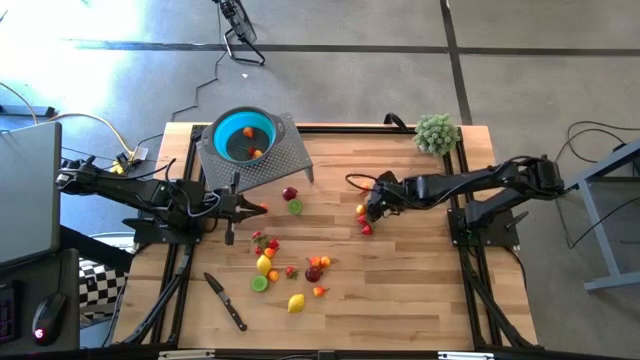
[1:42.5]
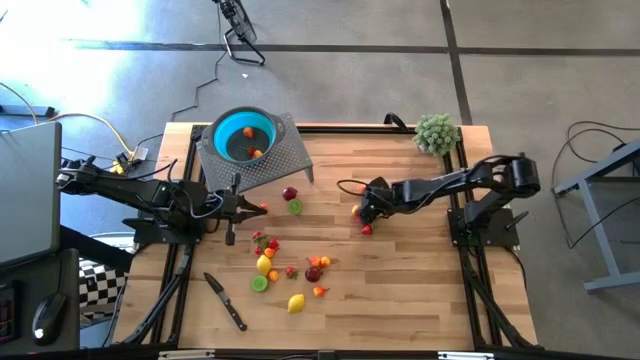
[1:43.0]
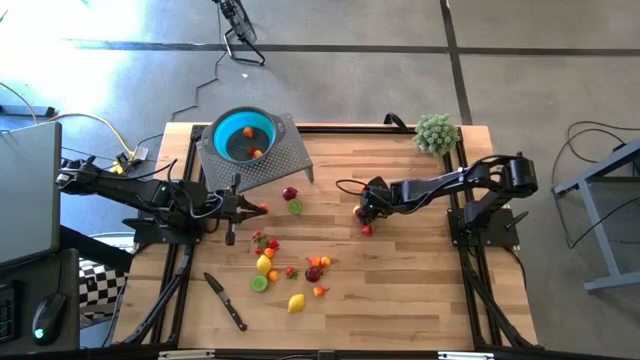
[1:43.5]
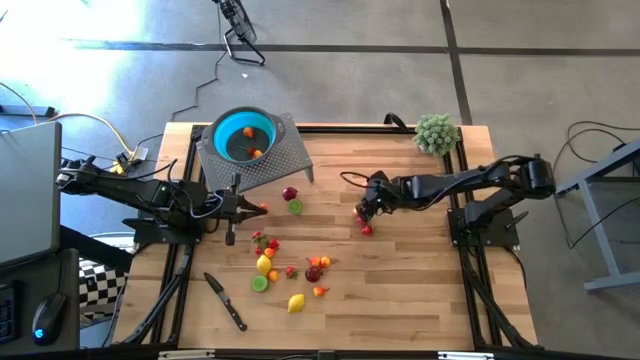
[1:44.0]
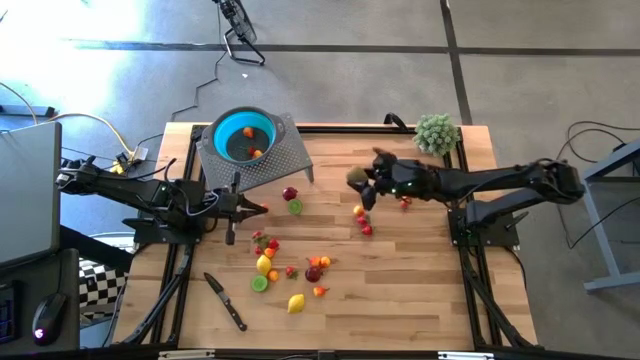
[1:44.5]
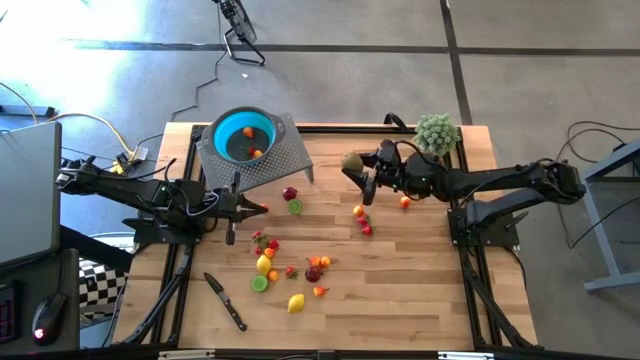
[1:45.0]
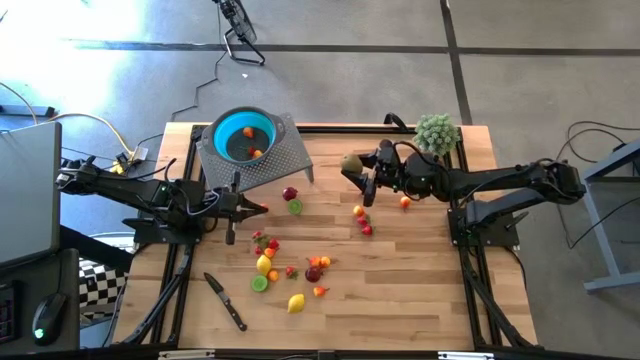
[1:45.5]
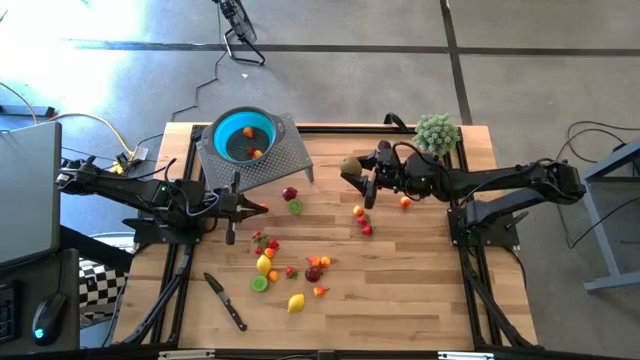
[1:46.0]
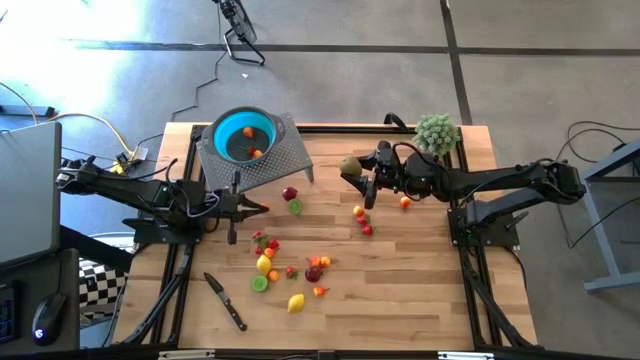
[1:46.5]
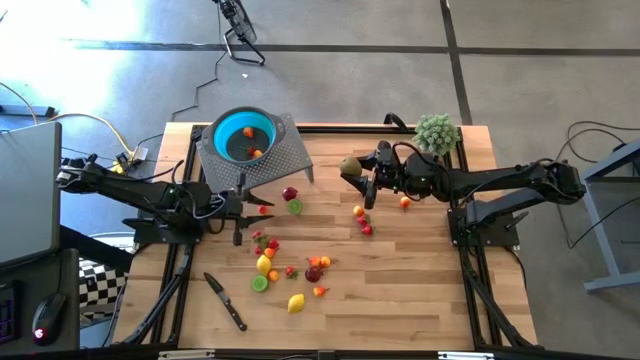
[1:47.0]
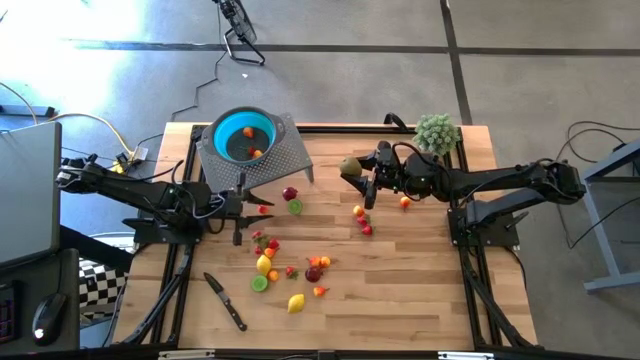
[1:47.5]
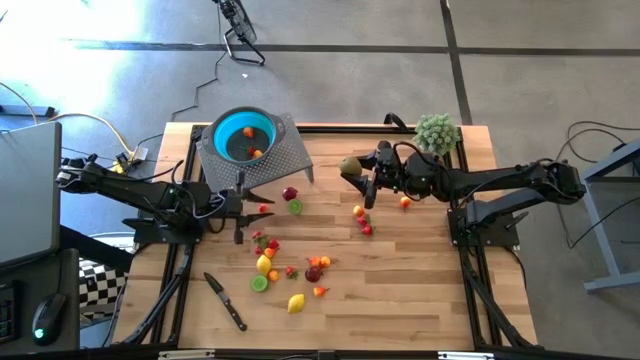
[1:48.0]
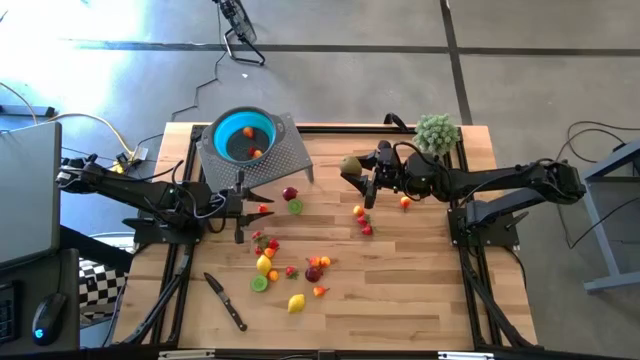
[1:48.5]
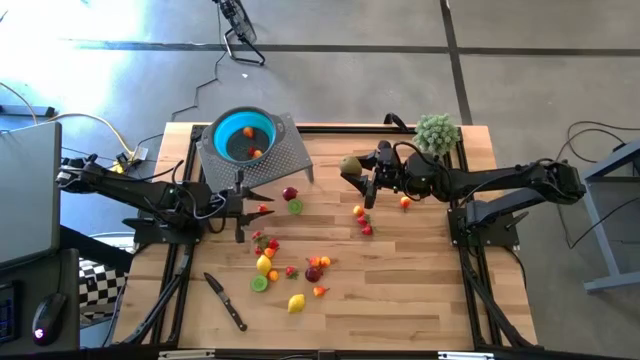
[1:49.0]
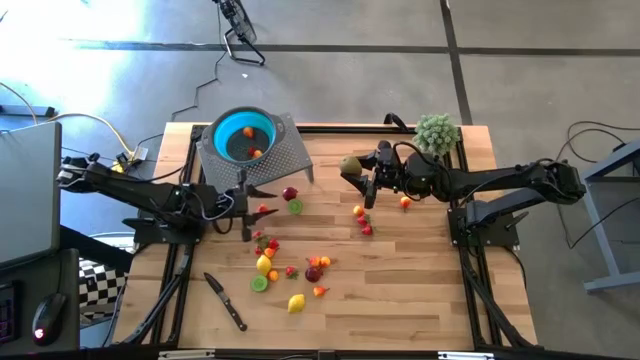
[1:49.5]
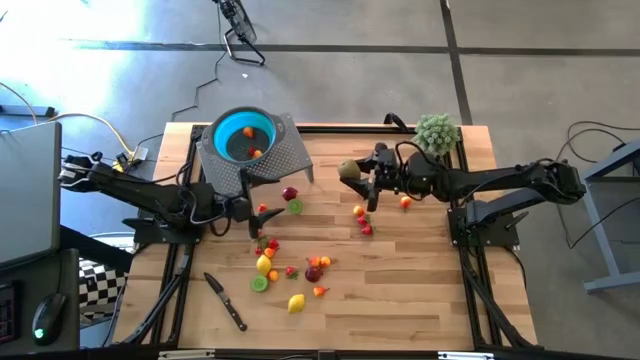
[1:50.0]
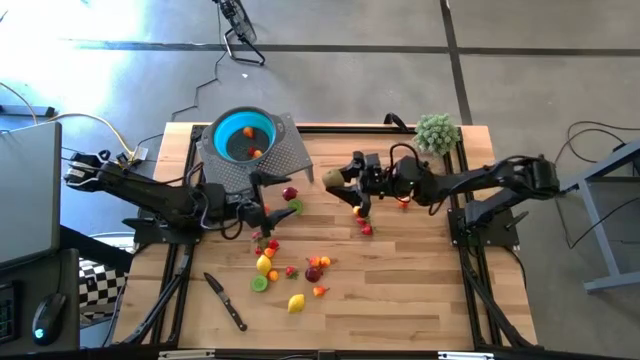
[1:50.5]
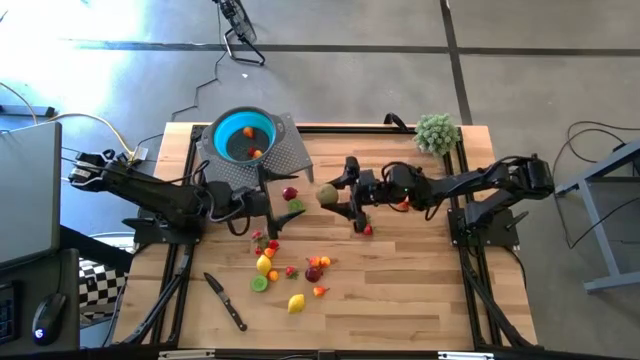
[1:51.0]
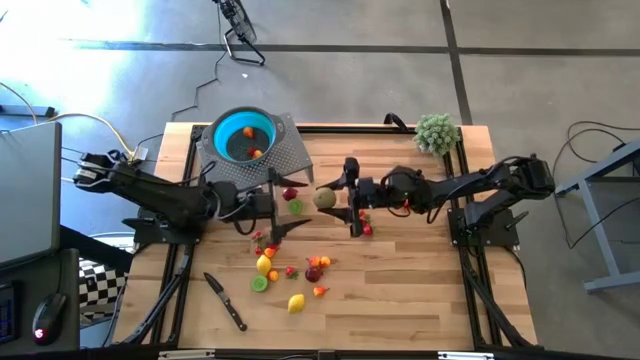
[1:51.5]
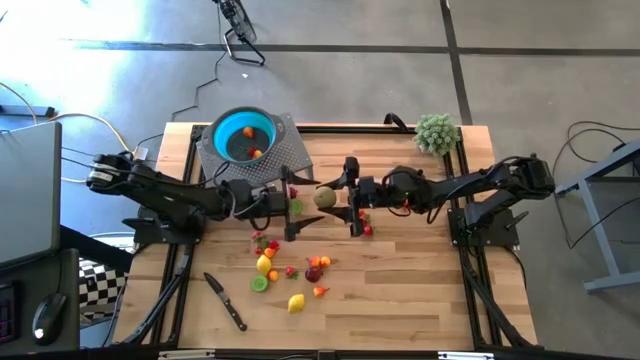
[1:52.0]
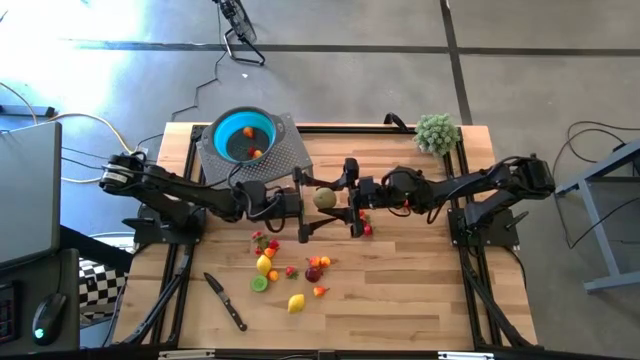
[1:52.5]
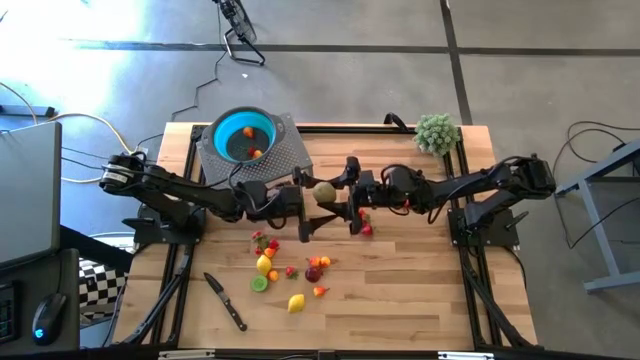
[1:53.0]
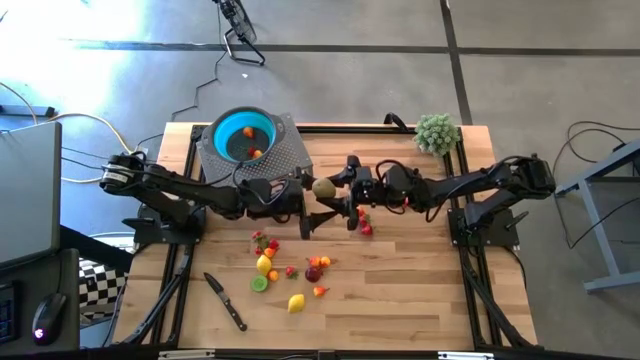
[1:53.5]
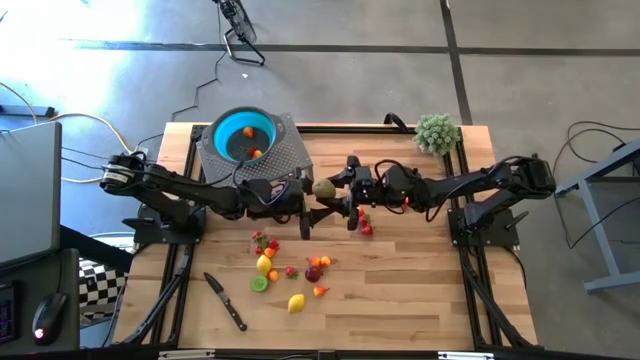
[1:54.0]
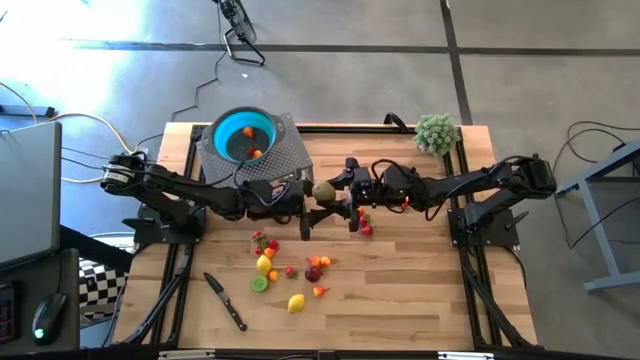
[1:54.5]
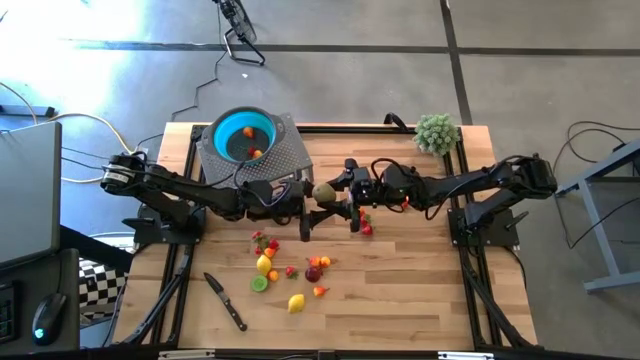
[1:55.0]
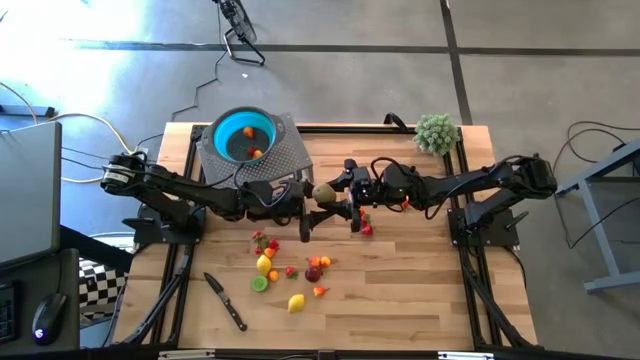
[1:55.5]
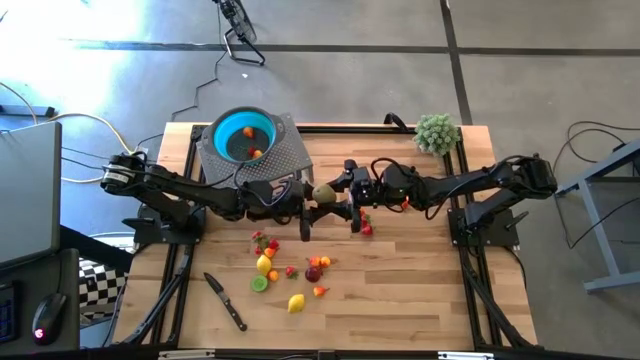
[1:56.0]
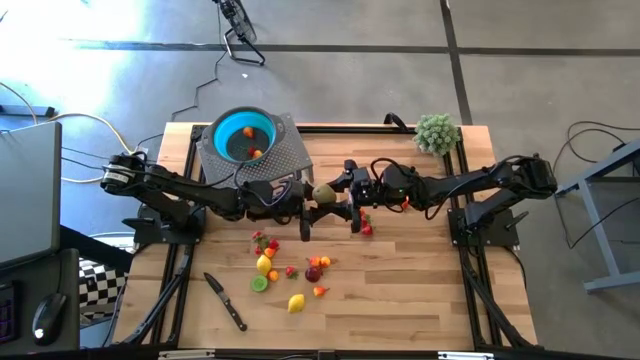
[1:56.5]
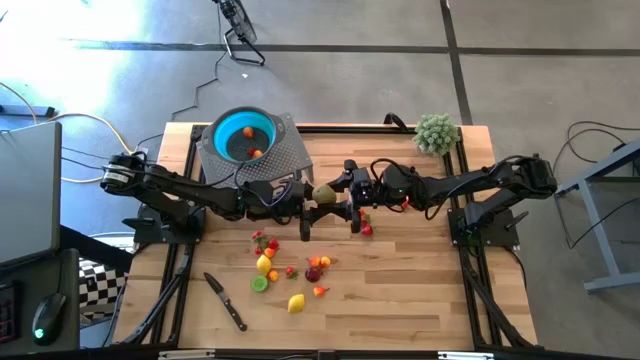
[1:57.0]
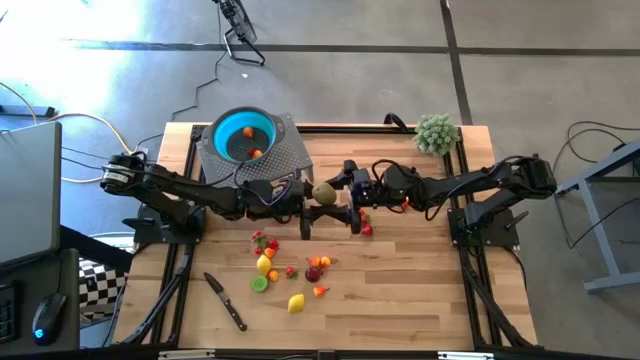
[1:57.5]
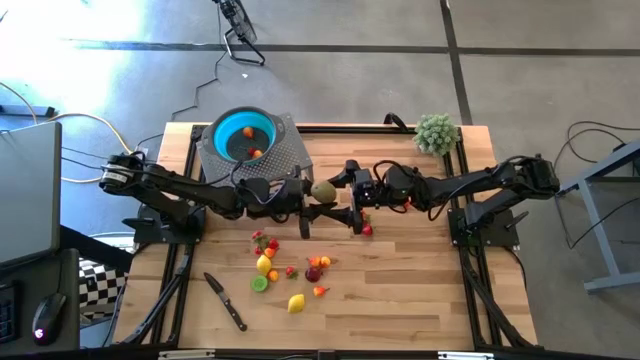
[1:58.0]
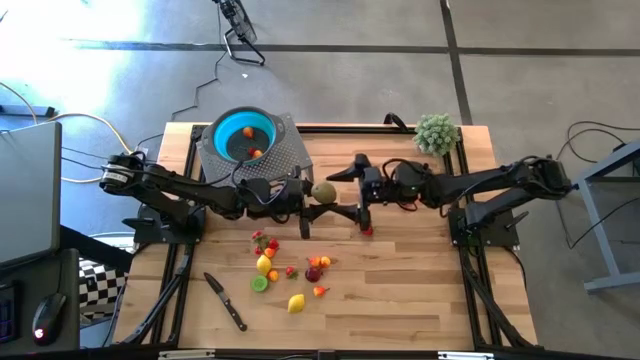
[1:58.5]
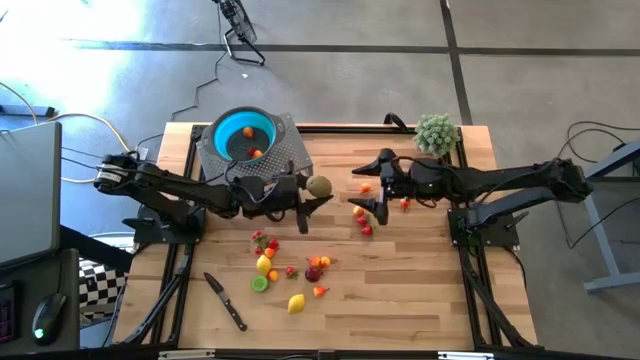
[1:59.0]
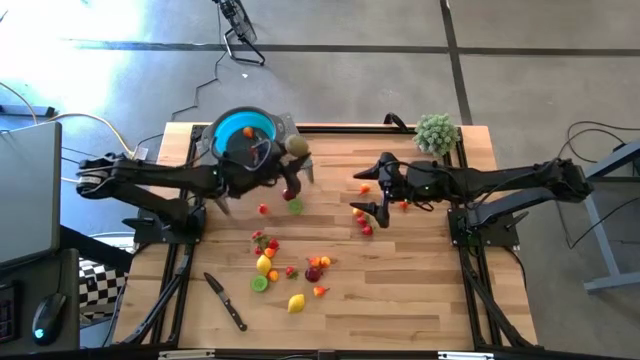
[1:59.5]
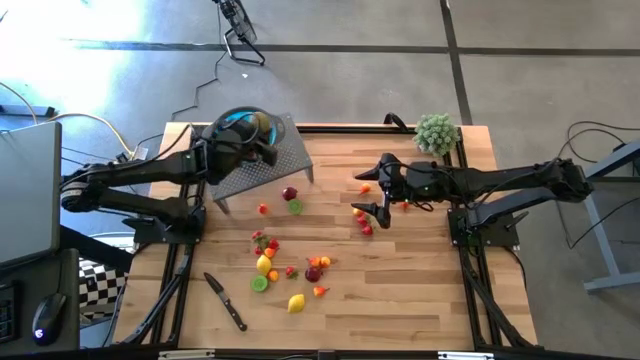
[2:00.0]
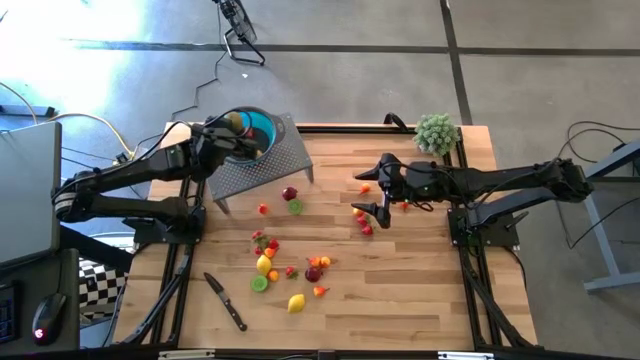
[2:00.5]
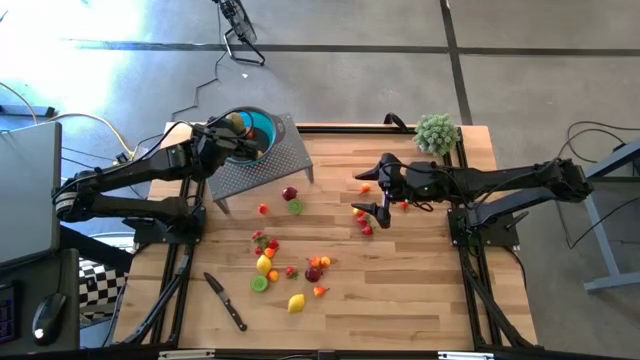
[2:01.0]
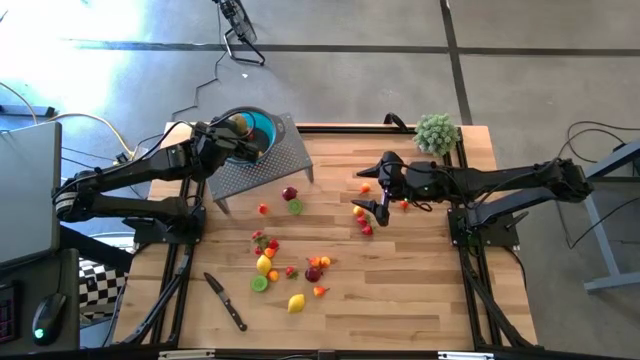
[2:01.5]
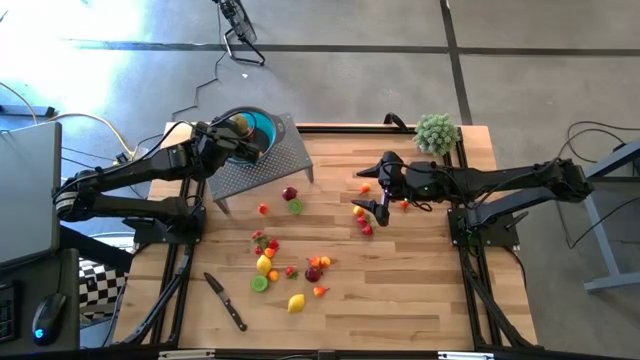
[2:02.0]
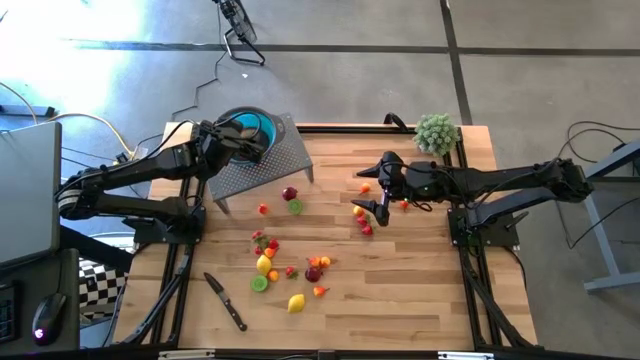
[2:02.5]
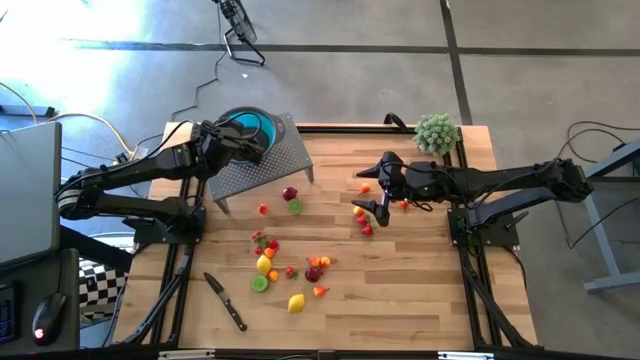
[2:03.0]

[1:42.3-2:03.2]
Task: Pick & Place Fruit
Put the right brown kiwi into the blue strainer bowl on the shelf
